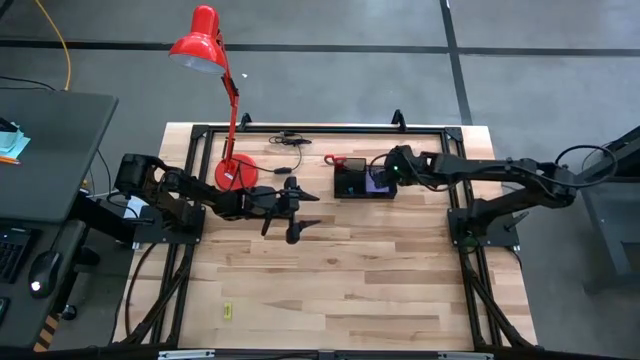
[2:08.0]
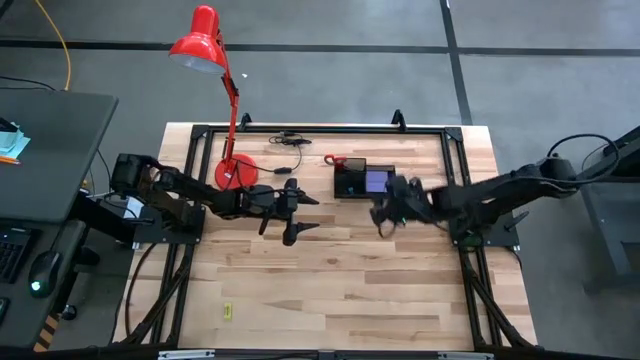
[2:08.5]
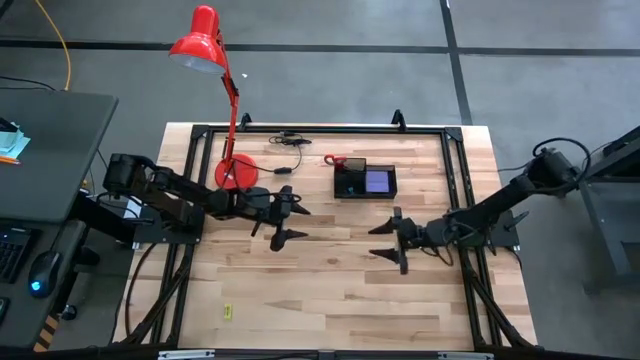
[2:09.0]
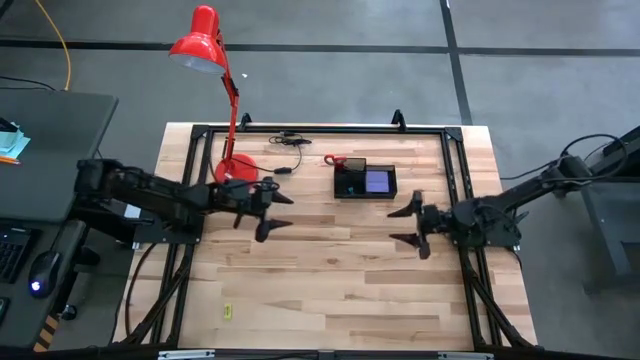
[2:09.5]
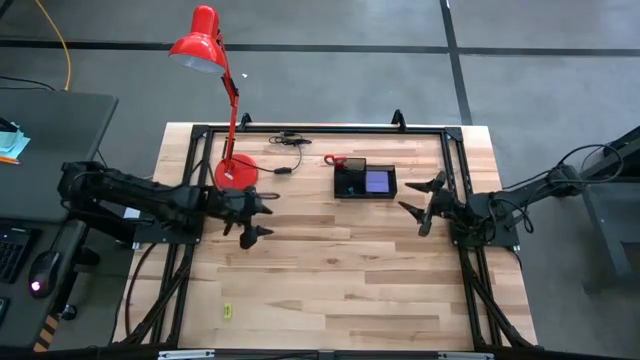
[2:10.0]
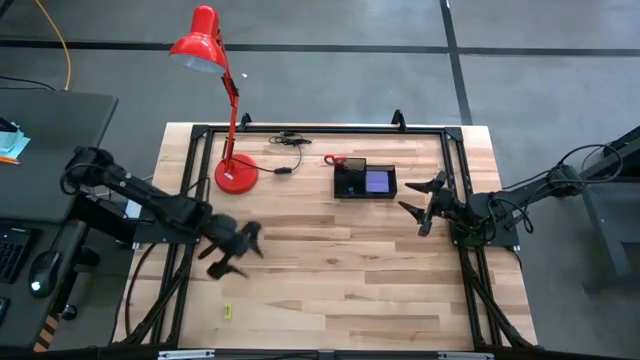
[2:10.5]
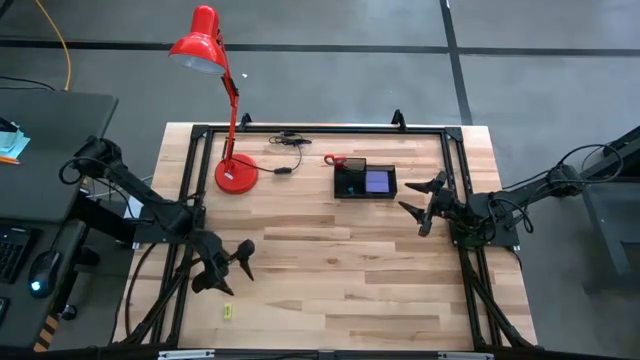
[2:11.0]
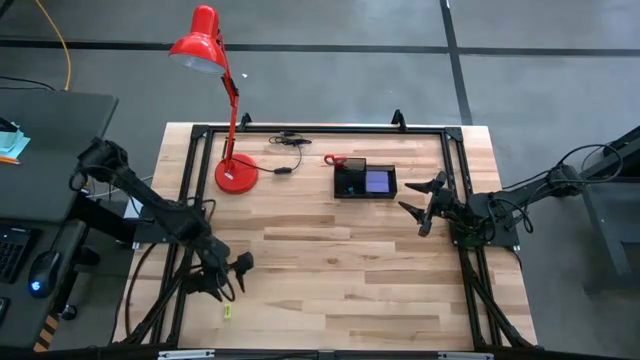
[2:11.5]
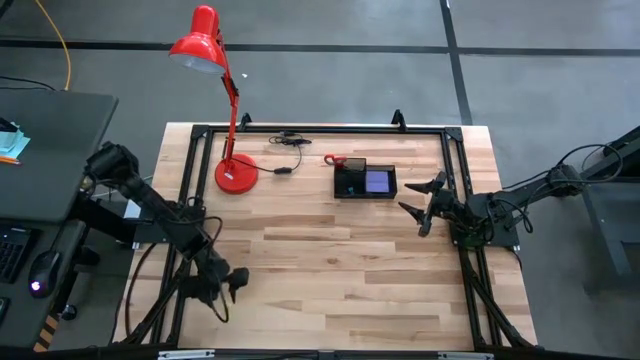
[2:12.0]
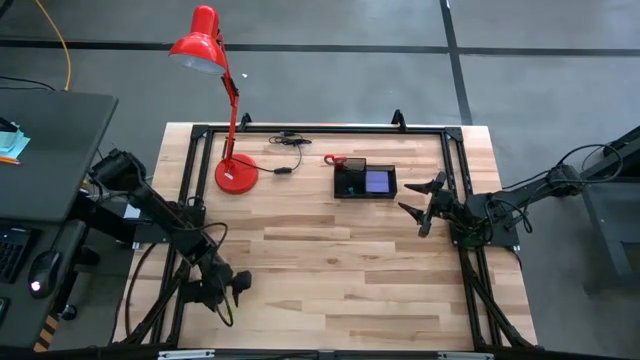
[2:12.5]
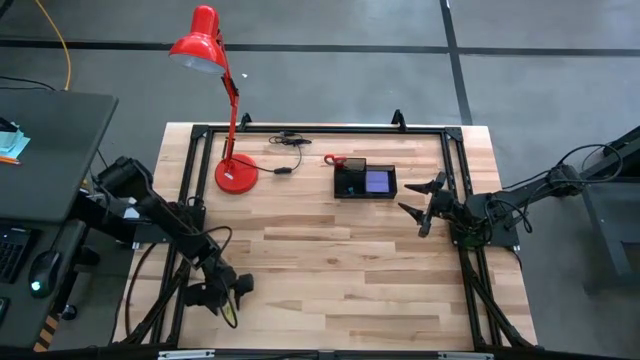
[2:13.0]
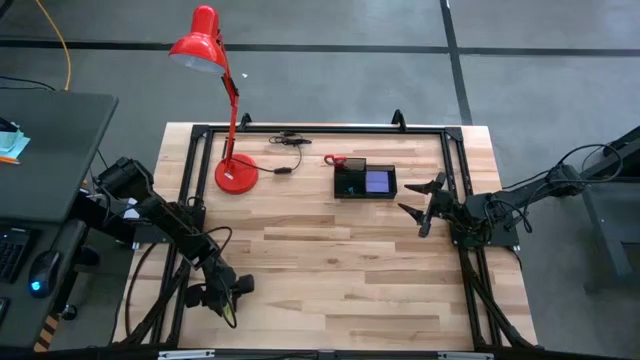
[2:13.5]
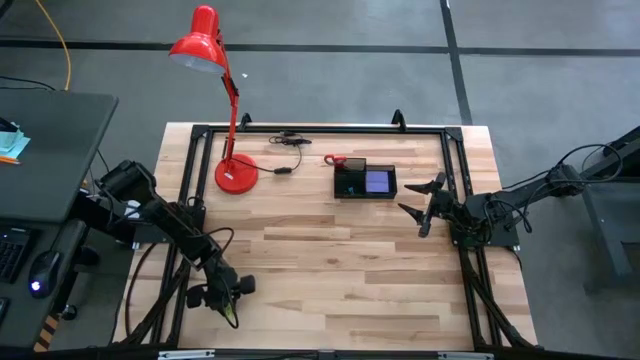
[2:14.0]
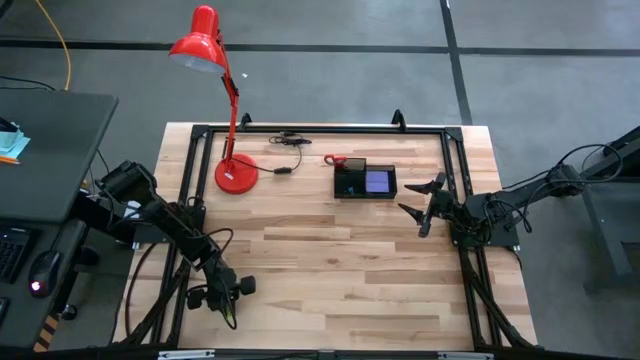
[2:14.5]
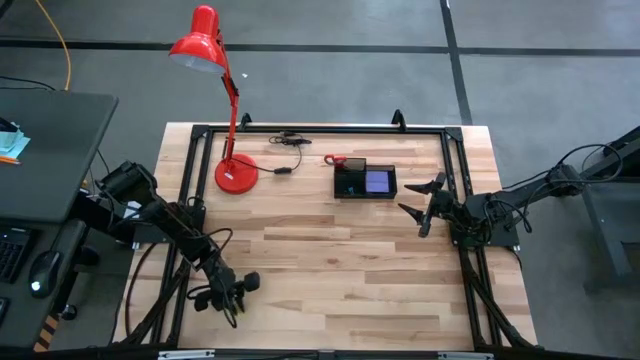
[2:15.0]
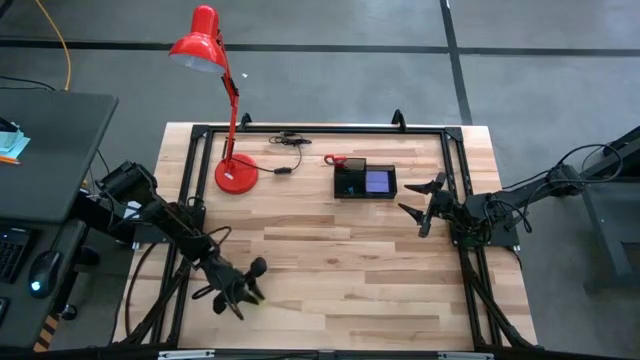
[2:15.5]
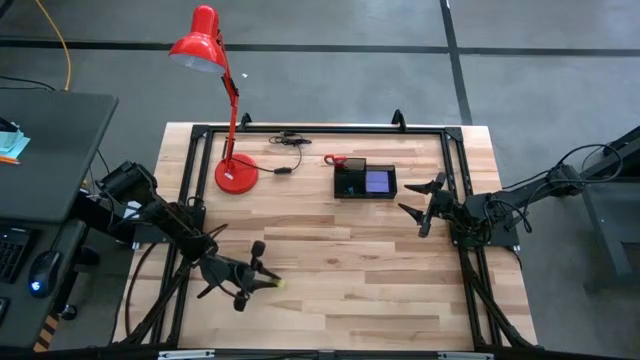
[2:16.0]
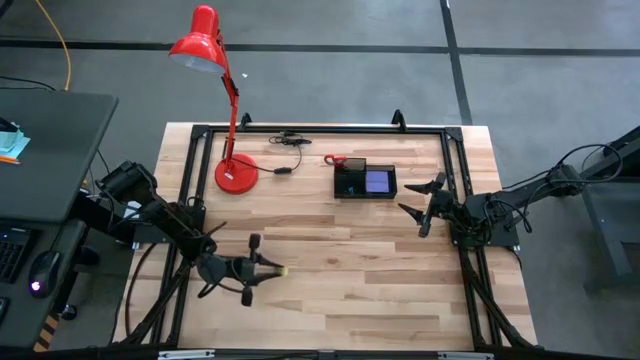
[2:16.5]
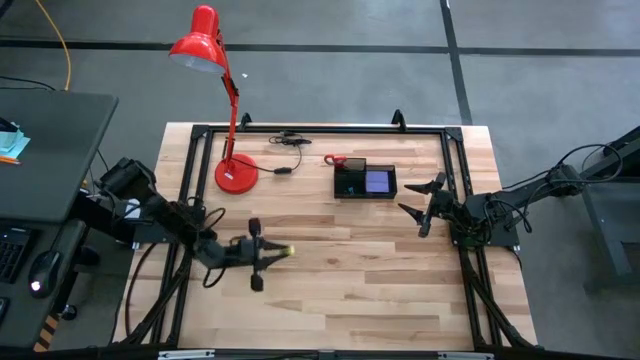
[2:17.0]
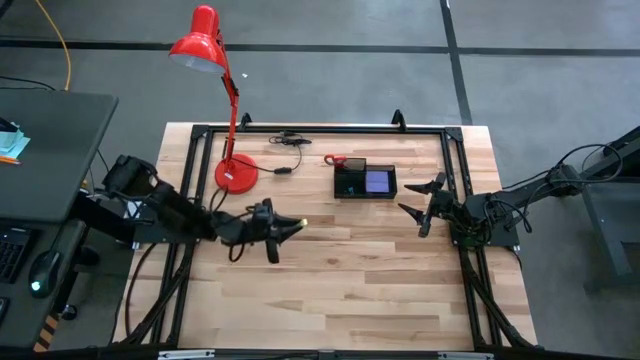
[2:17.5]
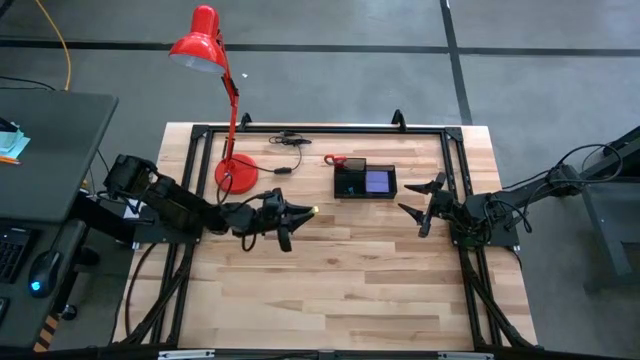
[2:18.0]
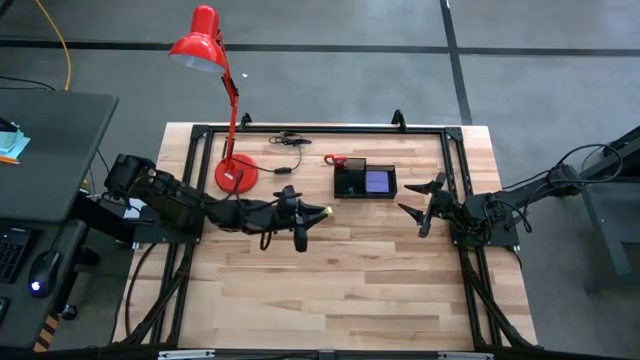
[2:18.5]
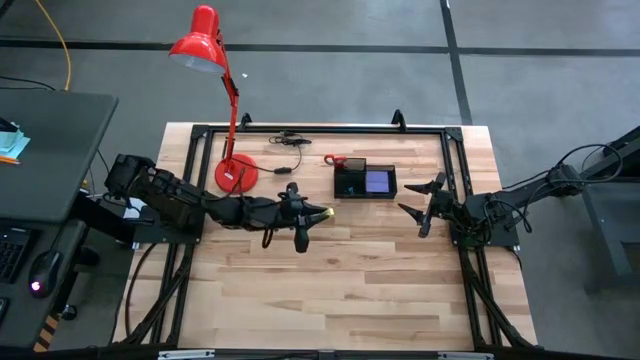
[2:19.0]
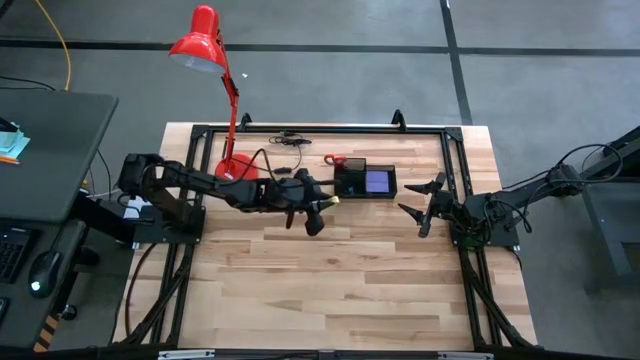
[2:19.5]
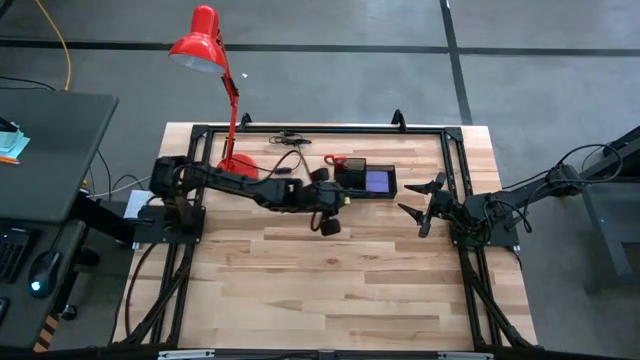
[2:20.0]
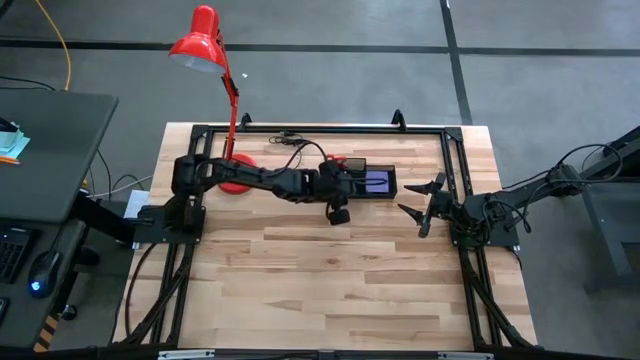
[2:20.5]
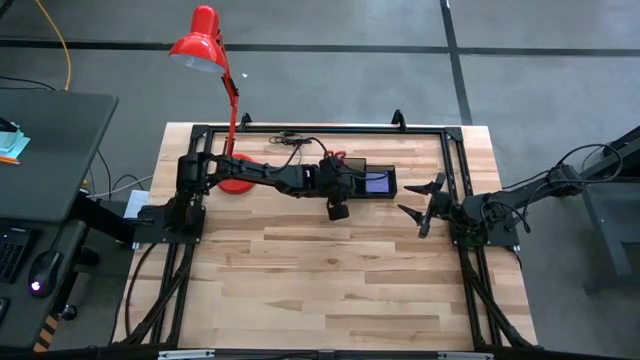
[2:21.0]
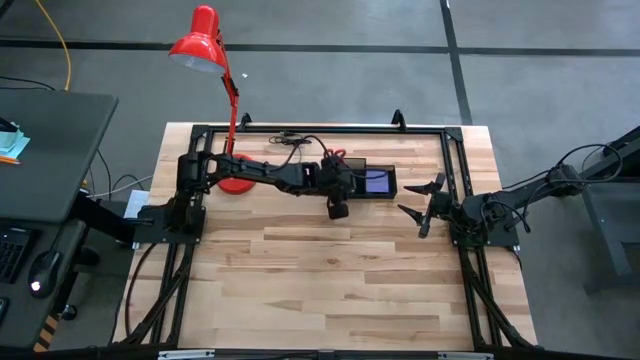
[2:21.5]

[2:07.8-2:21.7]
Task: Pick and place office supplies into organizer
Put the light green eraser into the black desk organizer

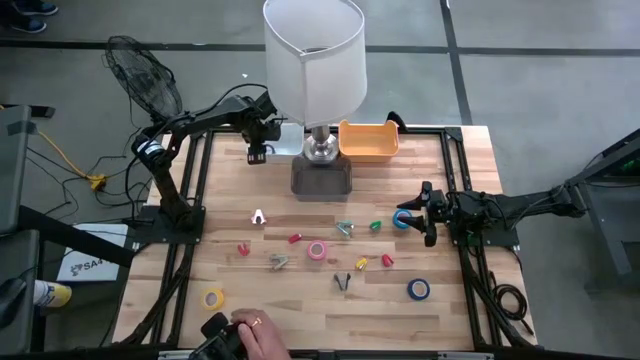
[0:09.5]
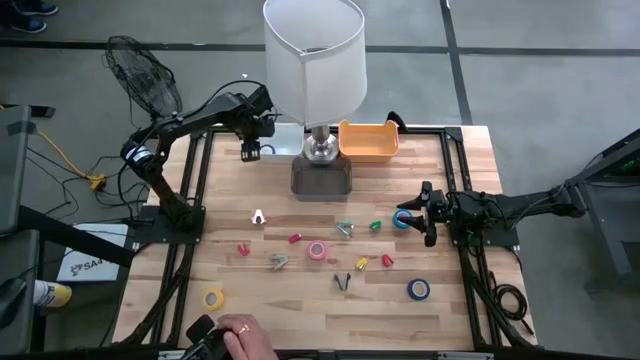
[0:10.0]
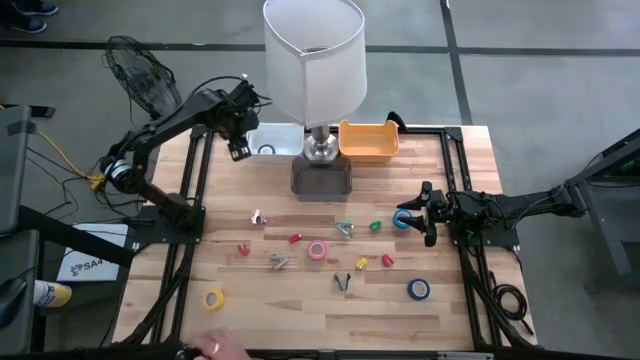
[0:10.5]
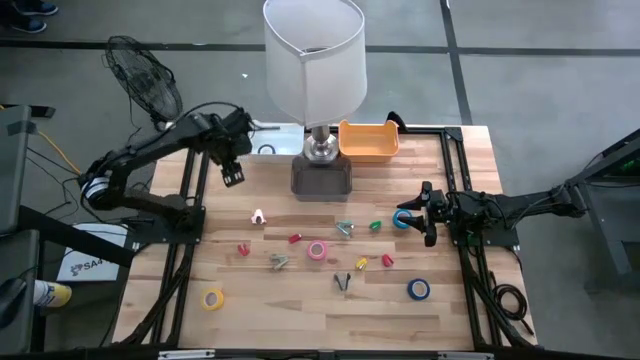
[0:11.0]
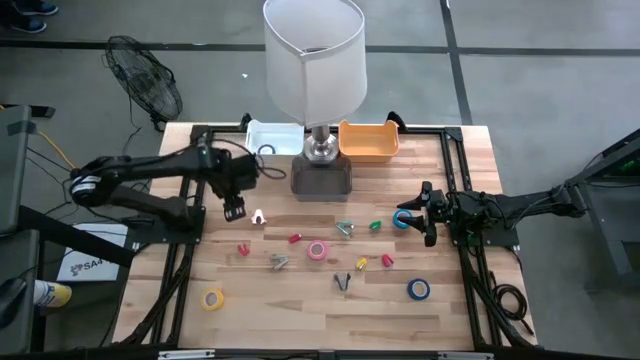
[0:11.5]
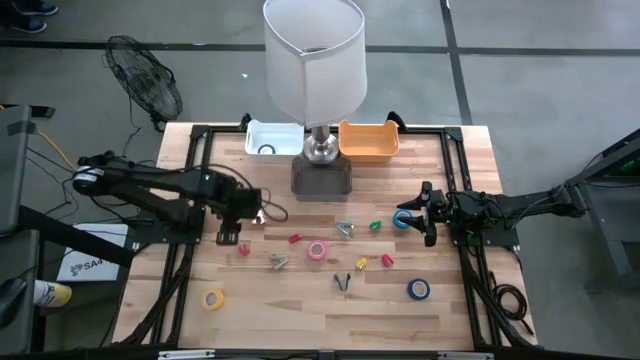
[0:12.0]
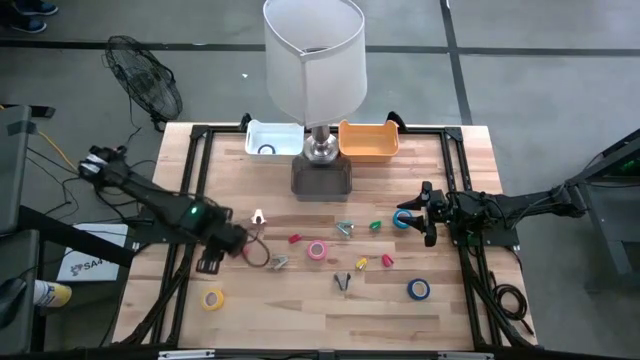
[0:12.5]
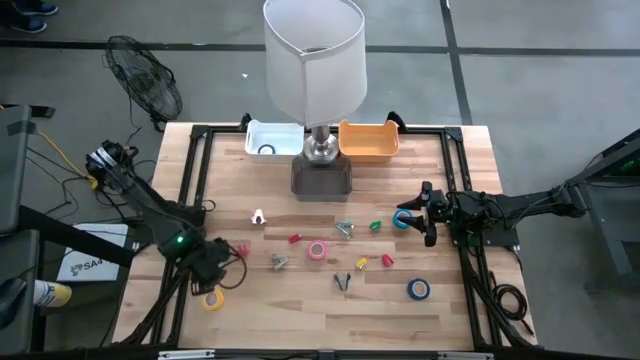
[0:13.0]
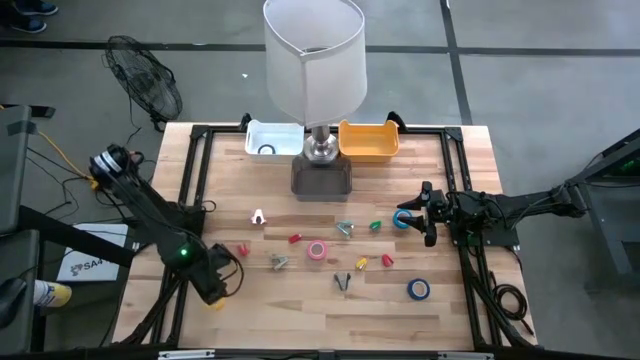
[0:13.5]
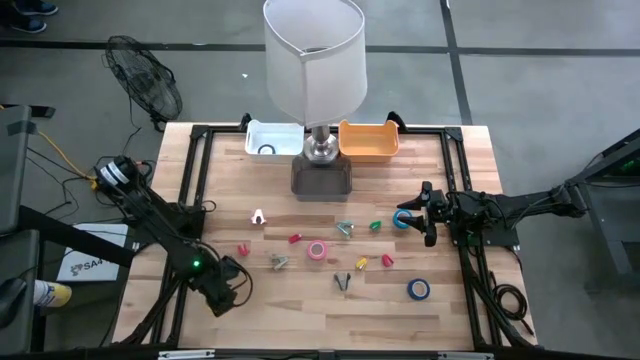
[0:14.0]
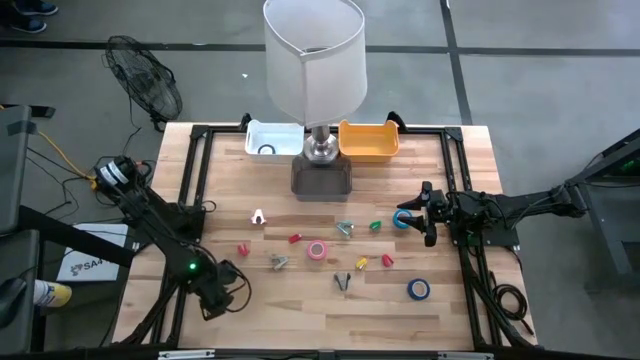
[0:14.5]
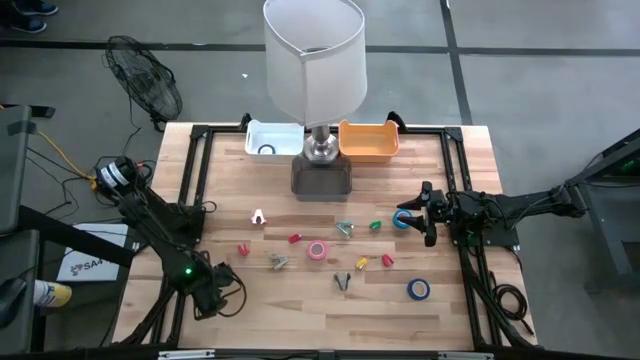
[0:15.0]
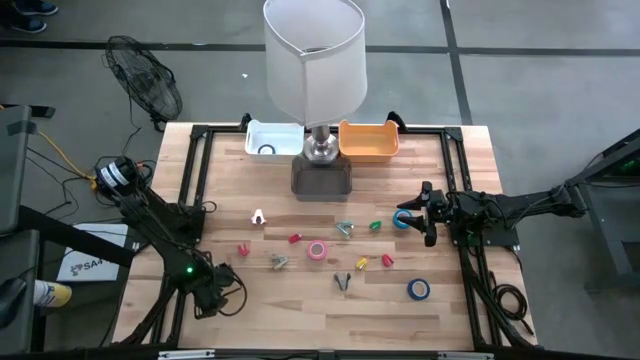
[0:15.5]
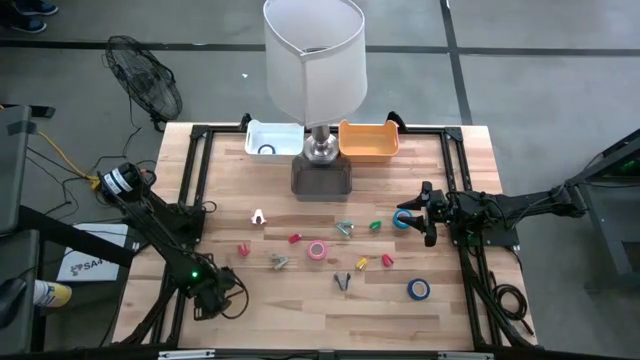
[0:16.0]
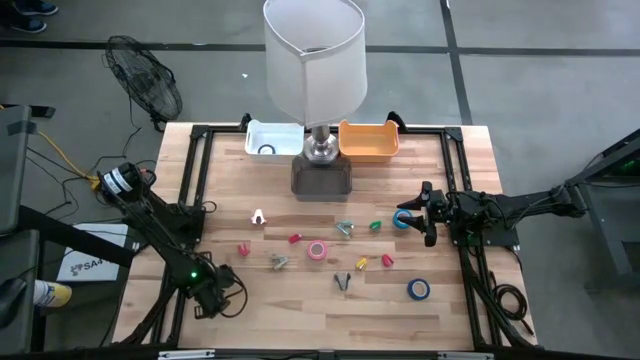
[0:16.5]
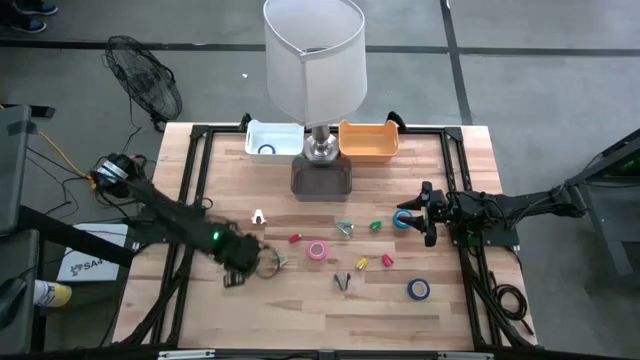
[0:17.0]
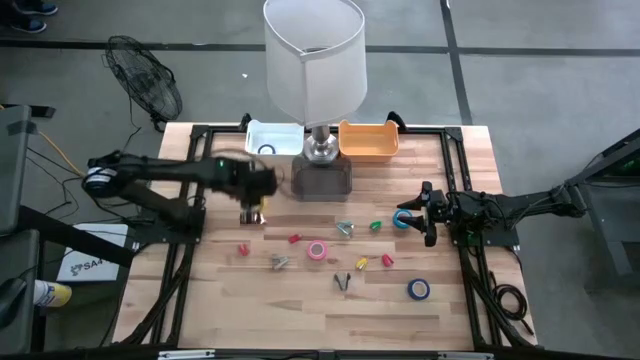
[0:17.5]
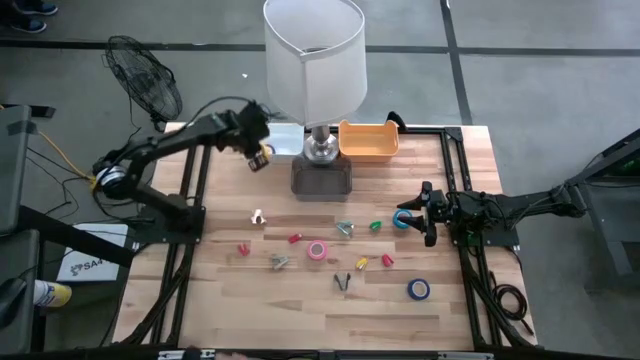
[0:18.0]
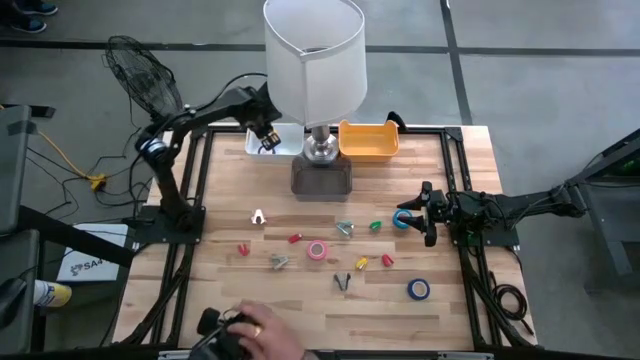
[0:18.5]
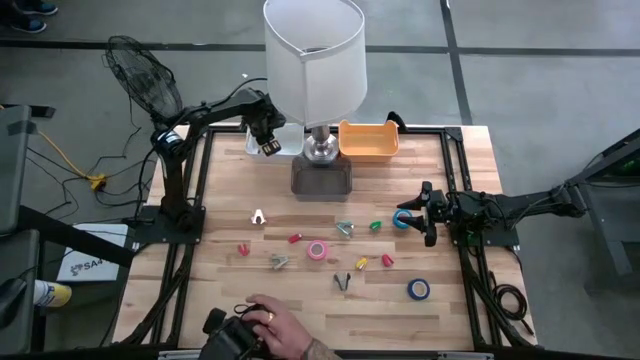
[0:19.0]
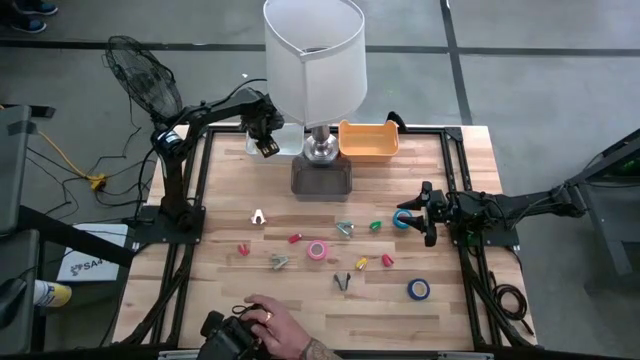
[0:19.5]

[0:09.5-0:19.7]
Task: Pick and place Stapler, Stapler remover, tape
Put the yellow tape into the white bin
